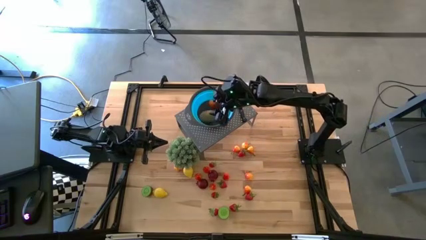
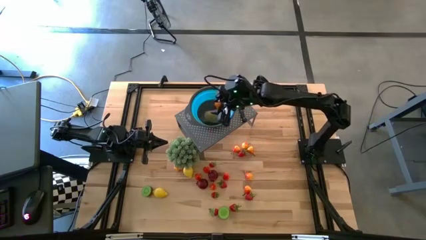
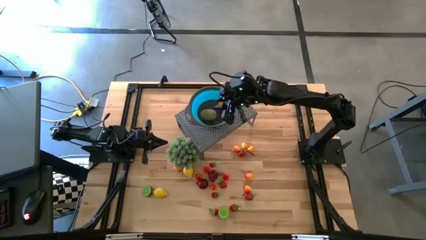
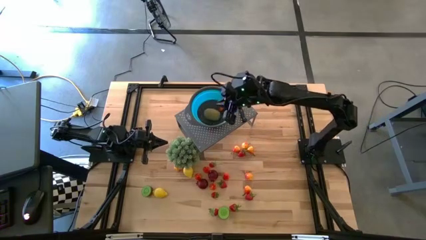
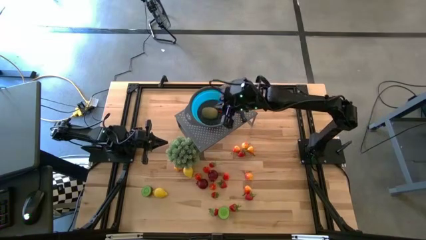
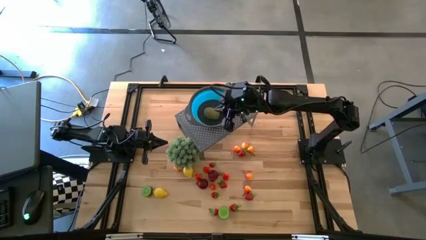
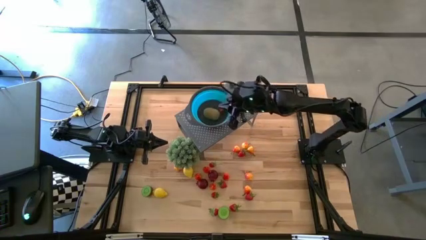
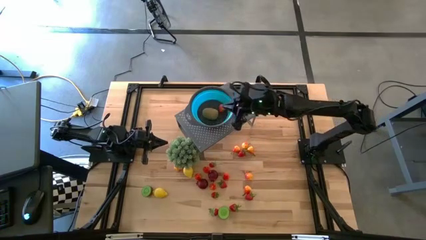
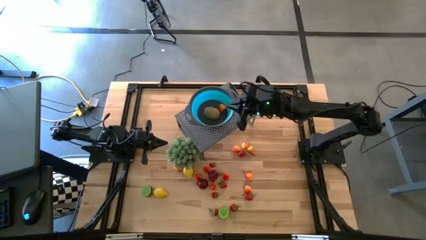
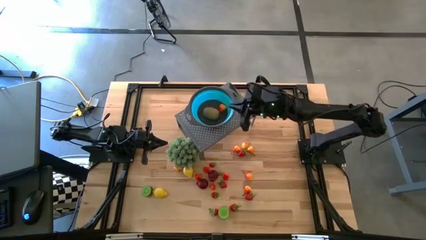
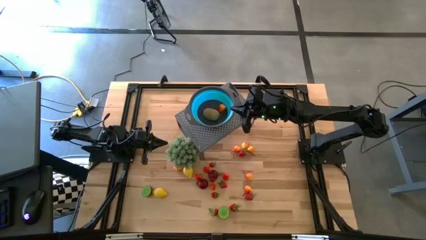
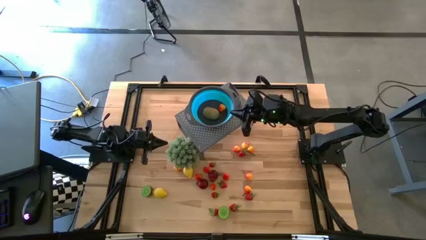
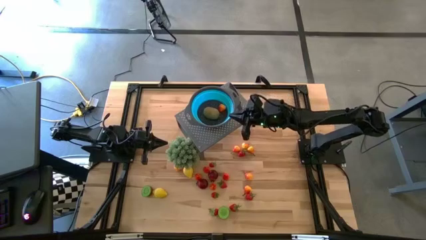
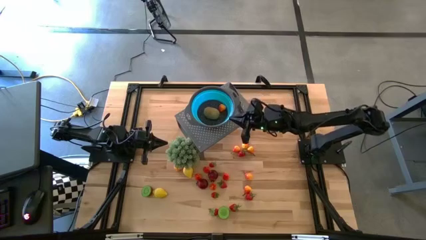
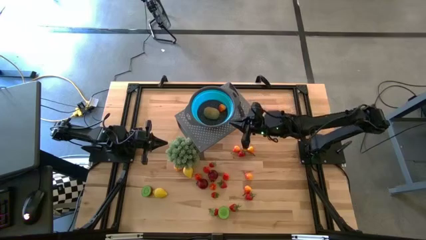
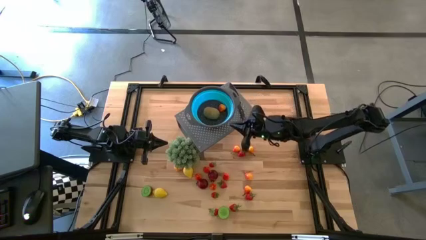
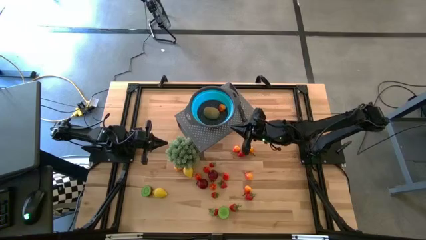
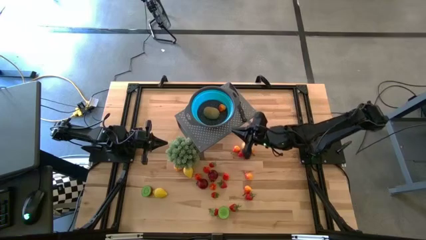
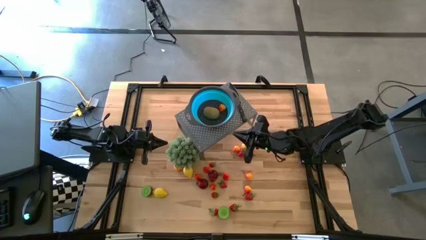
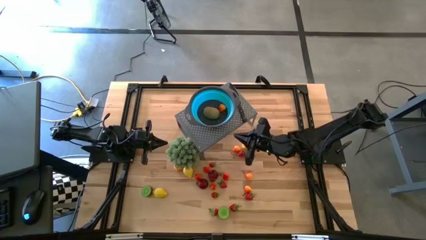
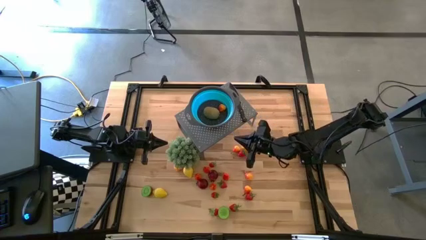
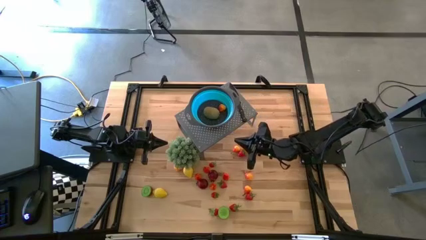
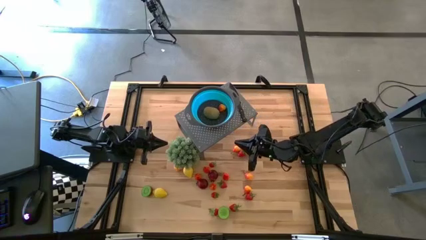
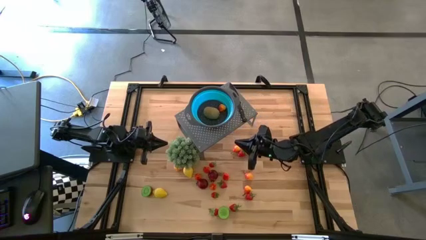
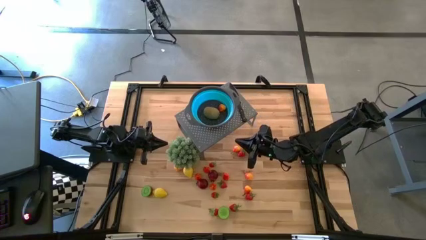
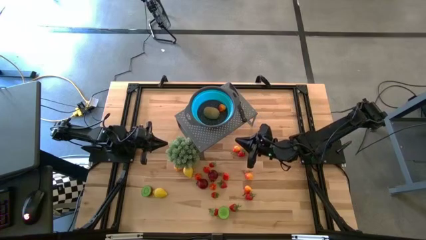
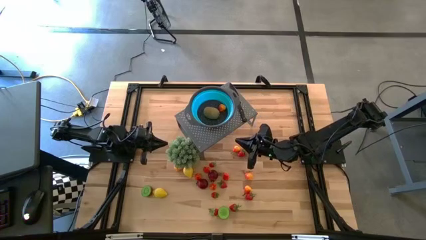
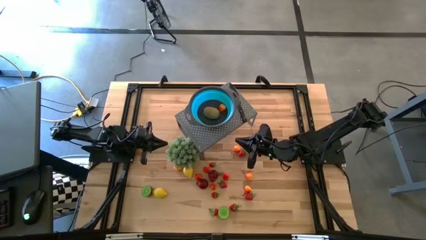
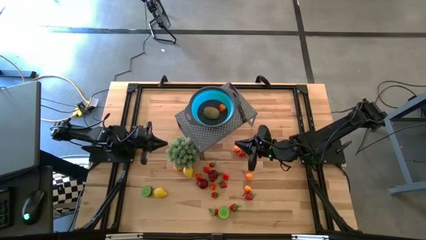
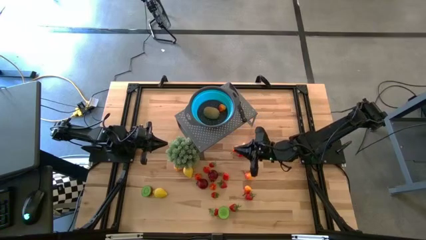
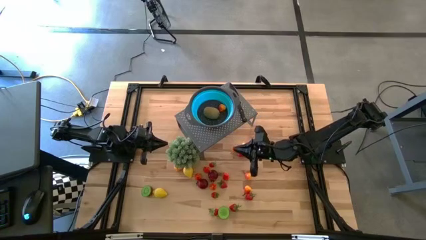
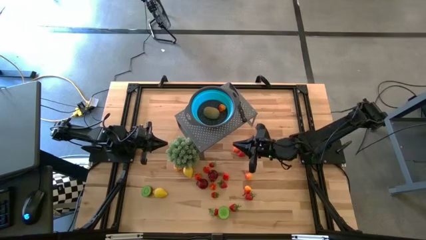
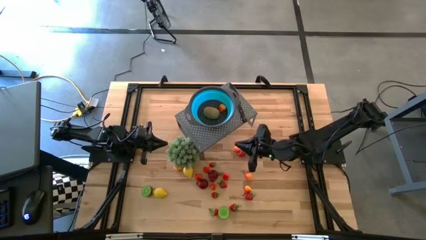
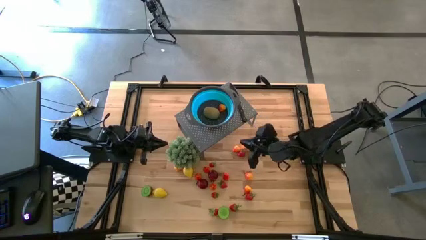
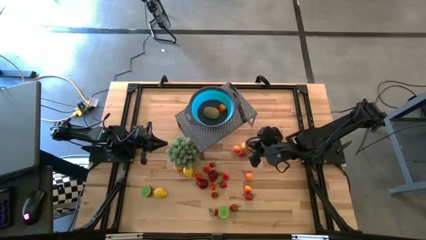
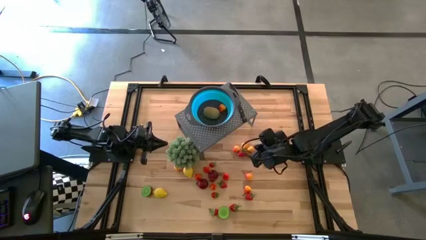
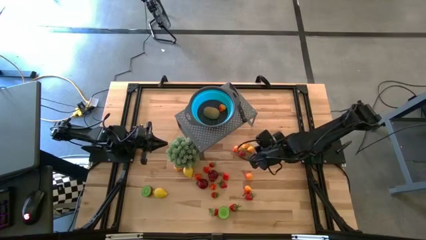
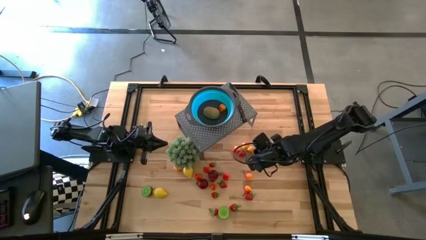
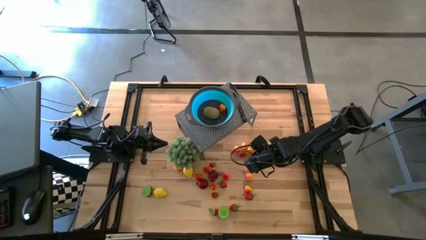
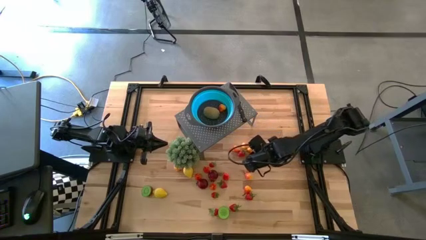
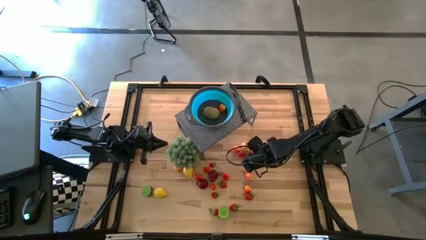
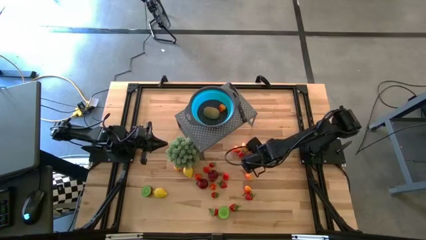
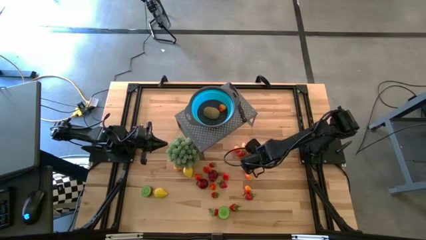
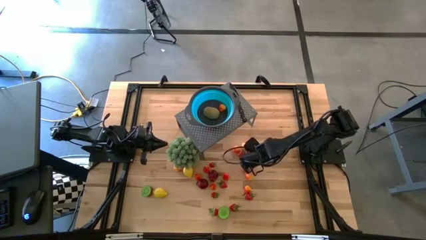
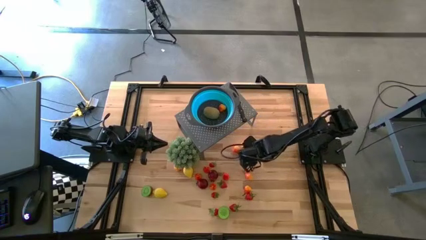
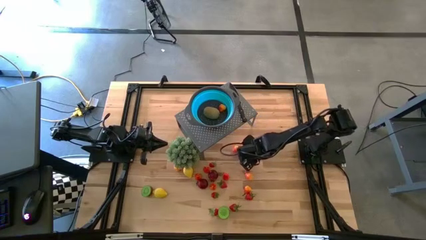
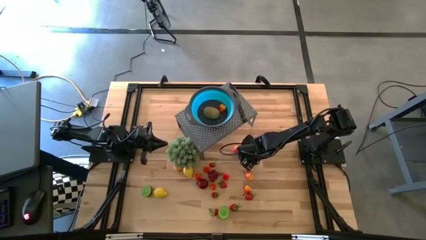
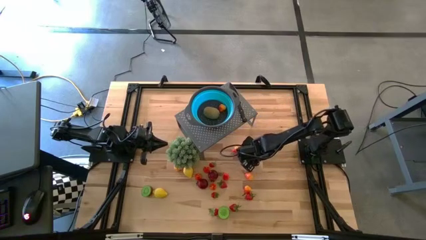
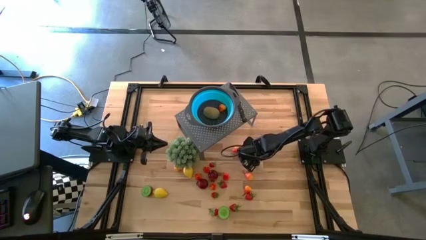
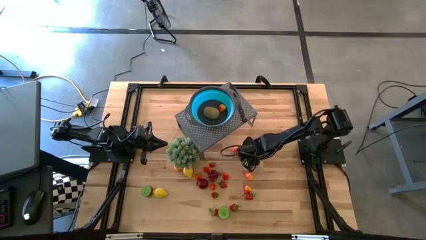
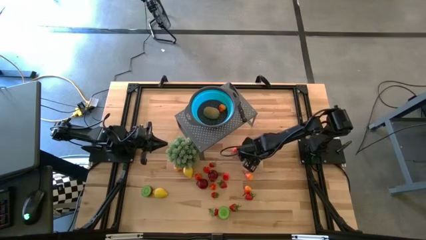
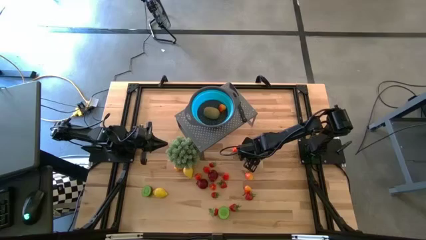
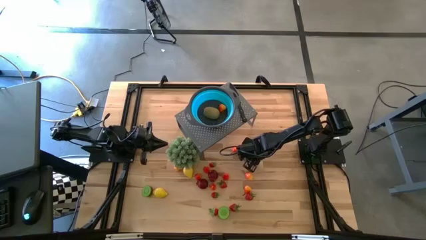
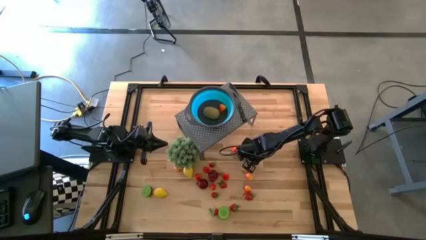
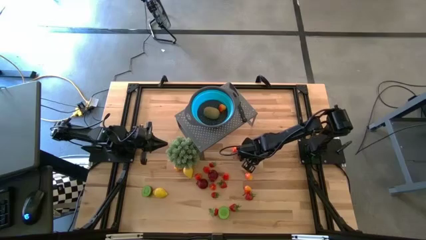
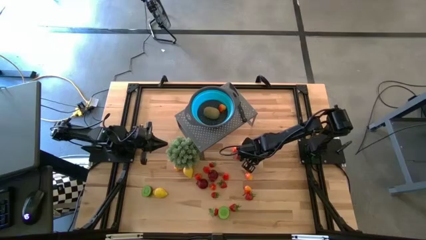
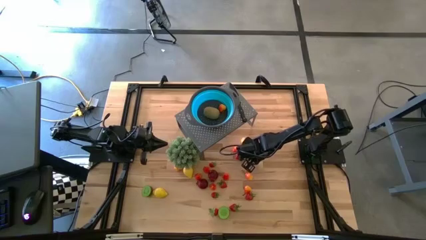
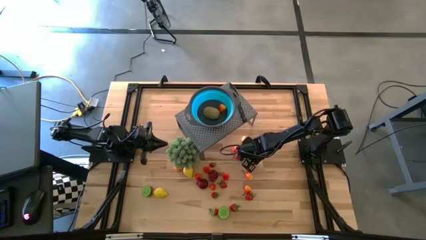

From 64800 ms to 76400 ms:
Task: Pick & Place Fruit
Put the pear into the blue strainer bowl on the shelf

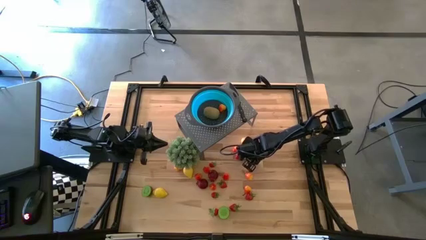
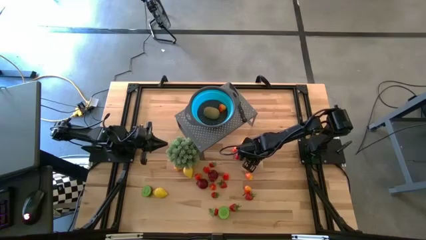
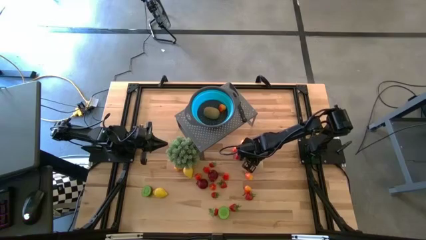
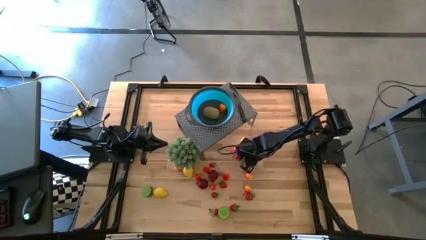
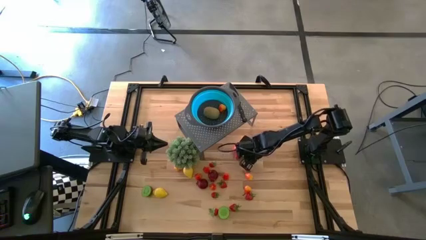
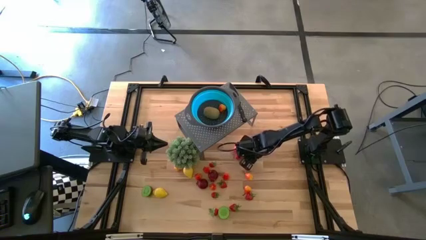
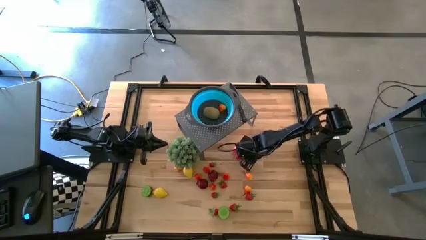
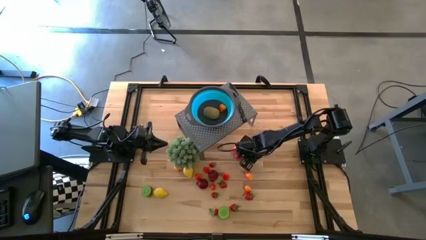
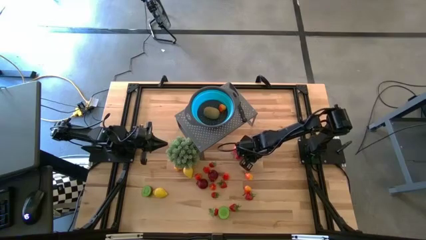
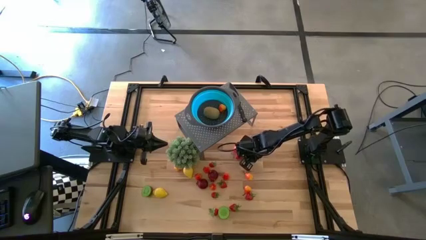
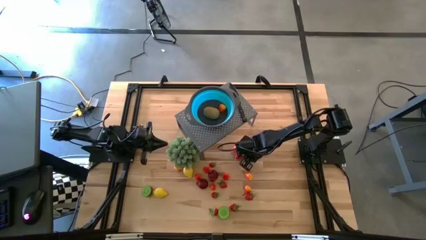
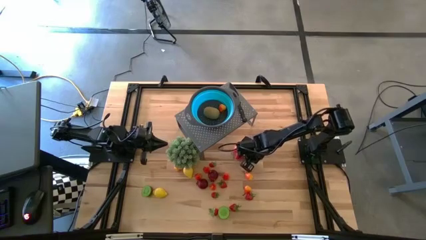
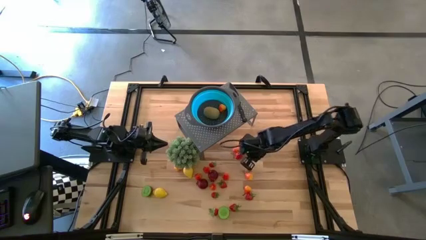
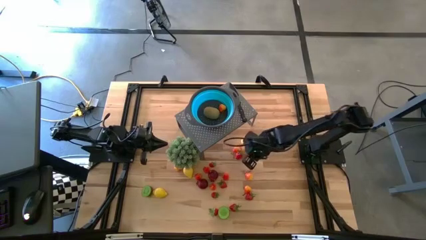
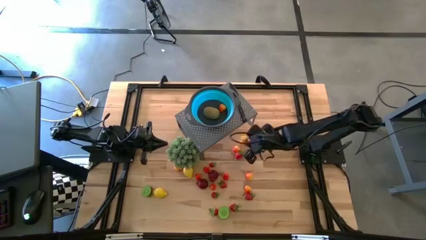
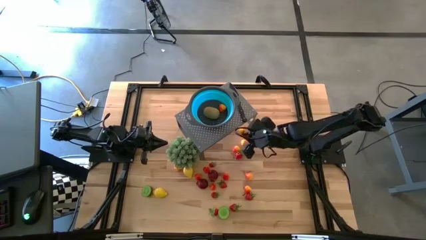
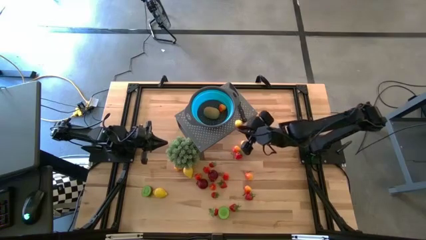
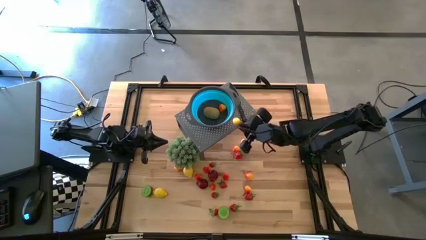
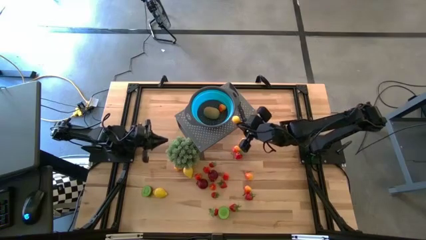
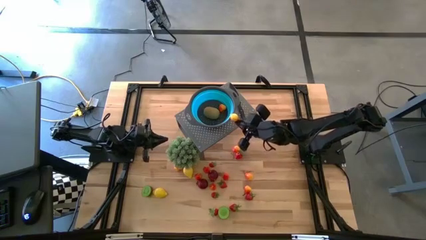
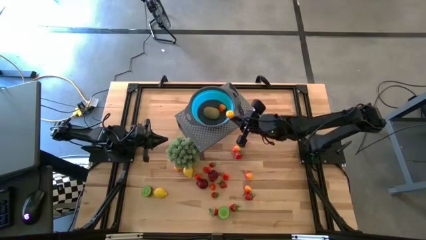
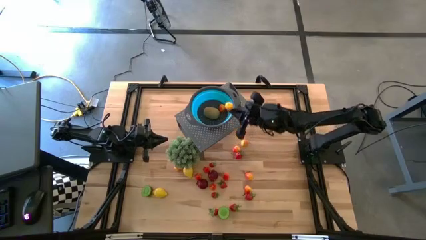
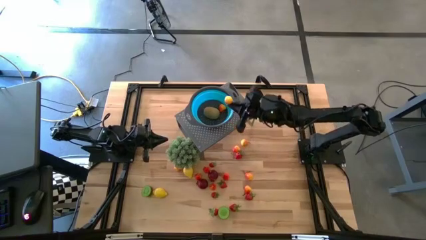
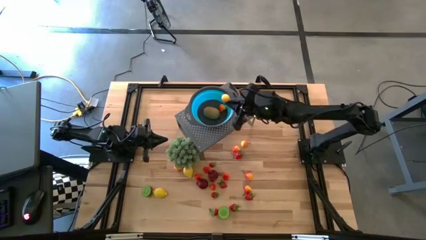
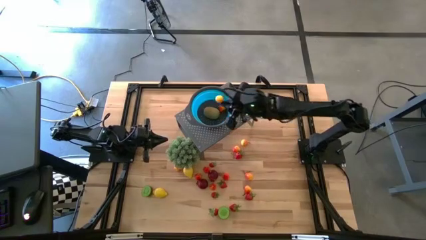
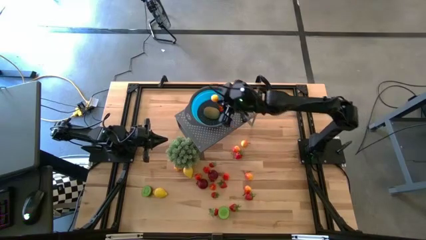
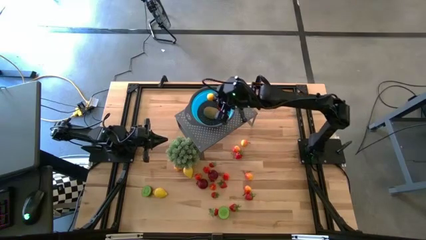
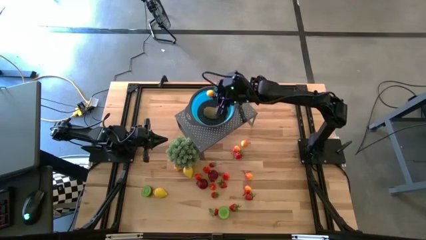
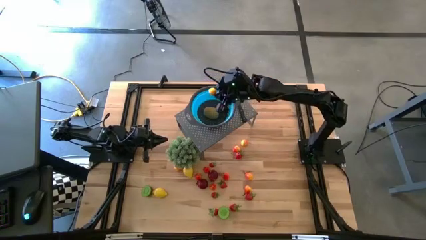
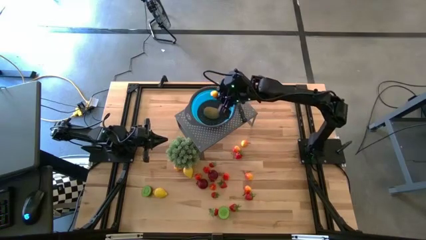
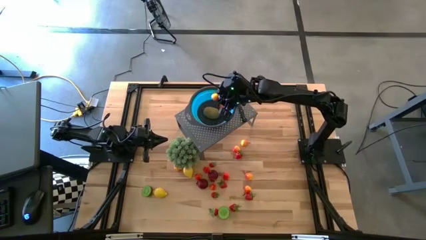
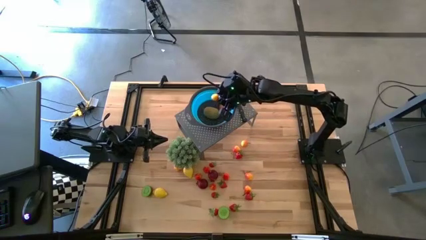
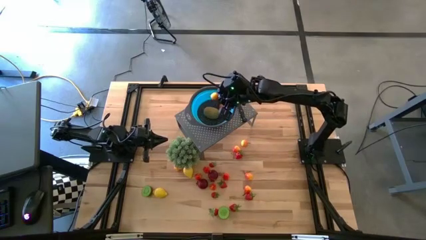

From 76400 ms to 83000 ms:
Put the pear into the blue strainer bowl on the shelf
